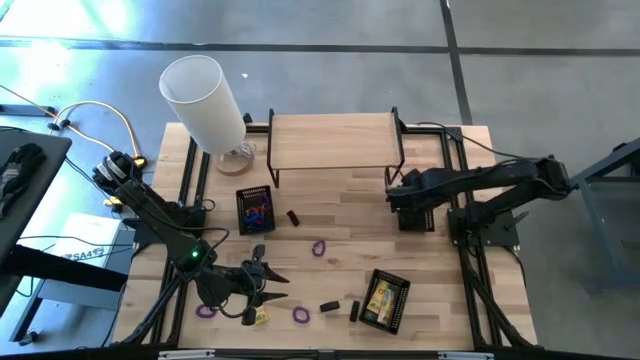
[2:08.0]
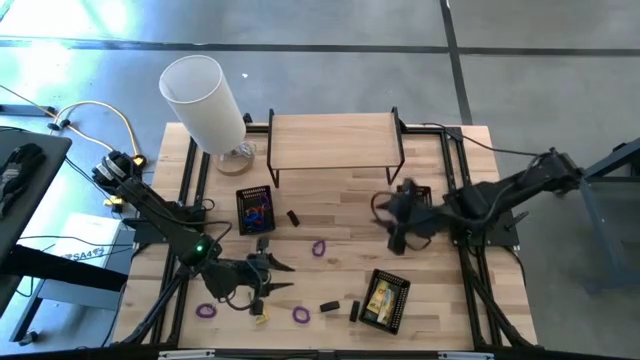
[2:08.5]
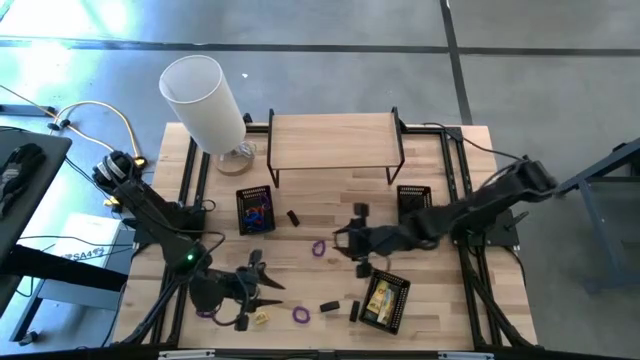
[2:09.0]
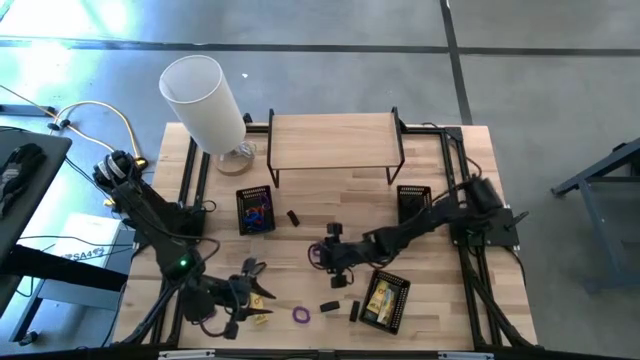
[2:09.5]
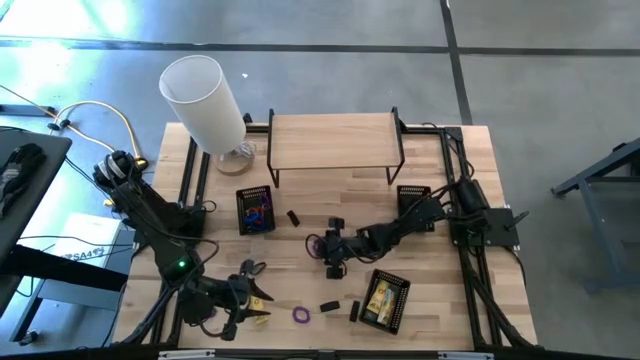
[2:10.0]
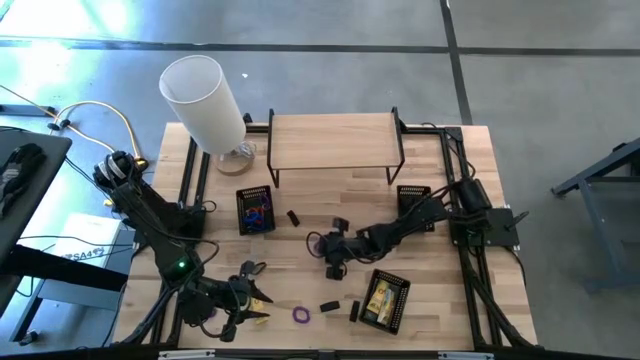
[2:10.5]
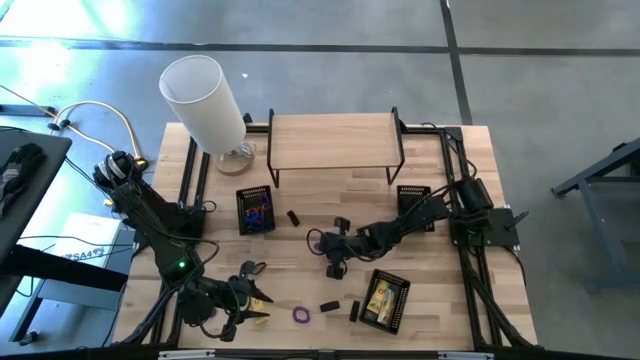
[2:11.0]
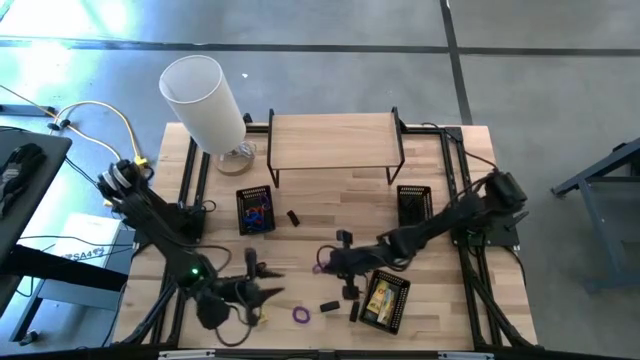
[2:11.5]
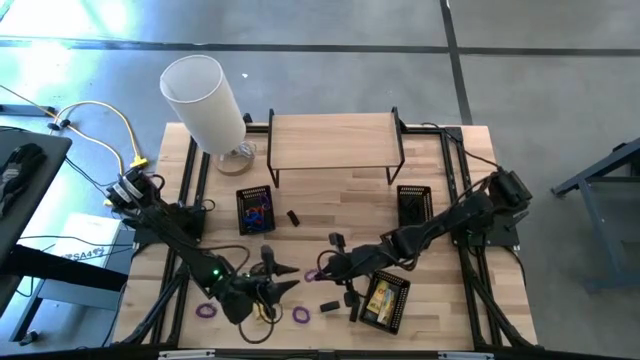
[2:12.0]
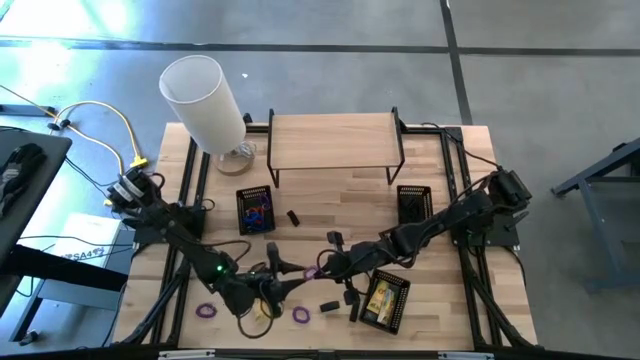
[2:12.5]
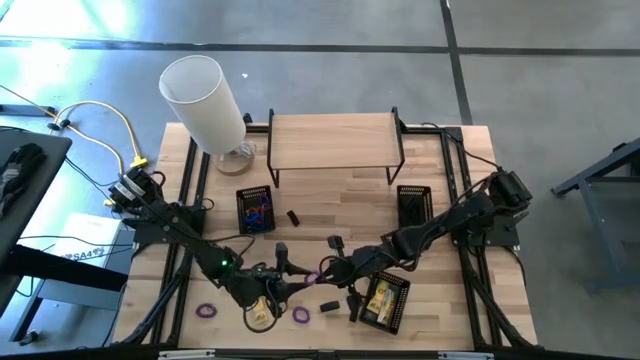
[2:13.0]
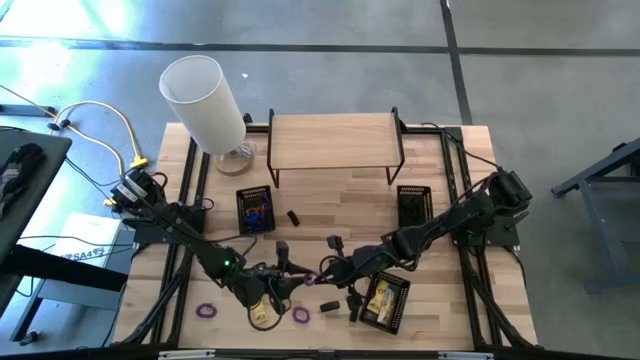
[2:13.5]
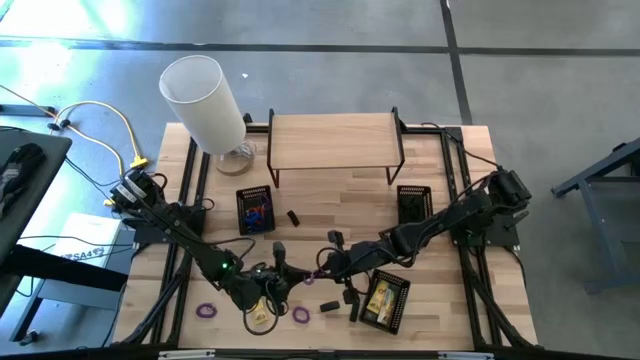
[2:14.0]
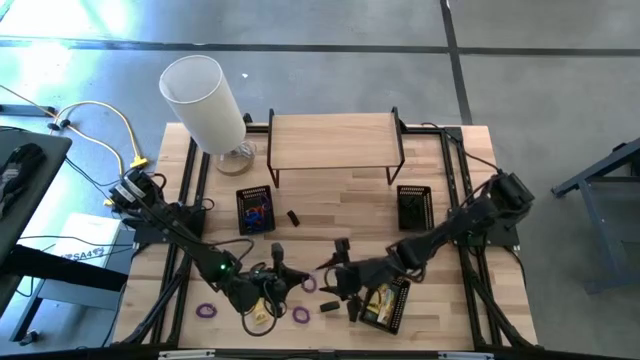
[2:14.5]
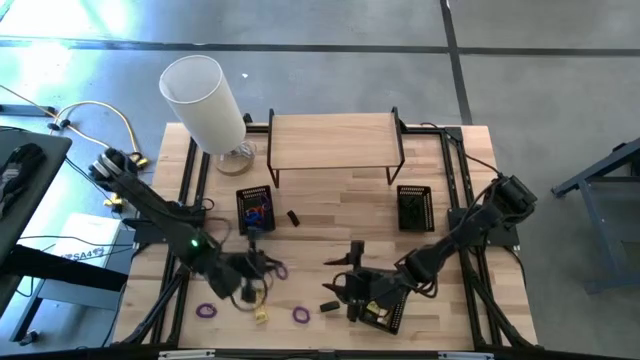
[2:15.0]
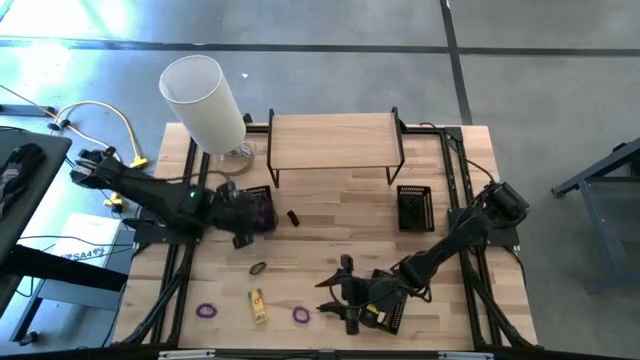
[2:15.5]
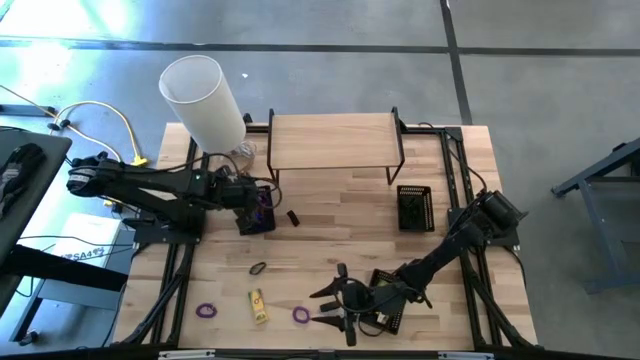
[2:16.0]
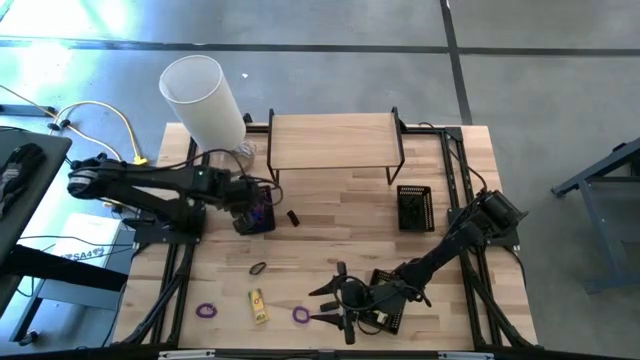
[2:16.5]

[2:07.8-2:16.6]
Task: Pick & Place Office Desk Supplies
Put the top purple spiral keychain into the top left bin

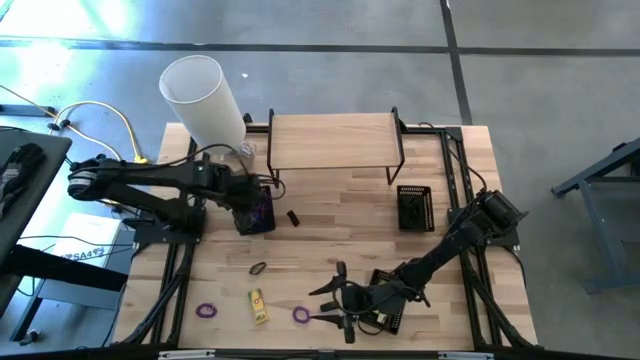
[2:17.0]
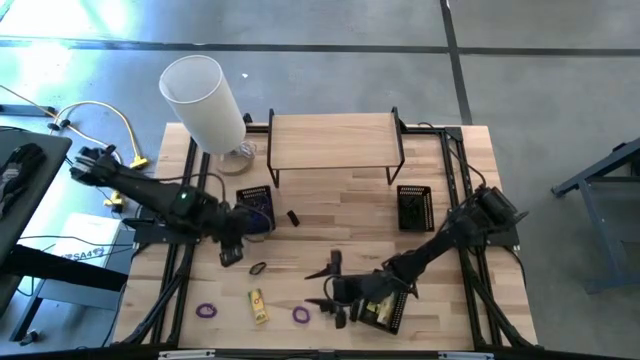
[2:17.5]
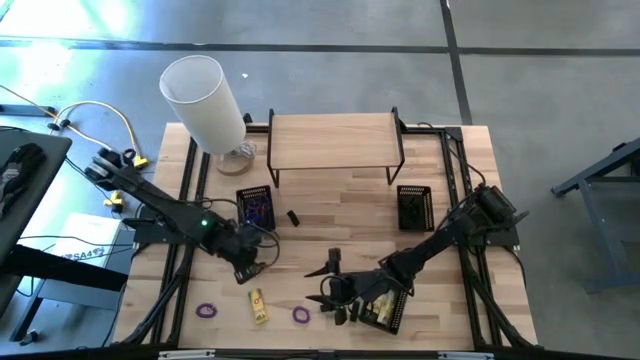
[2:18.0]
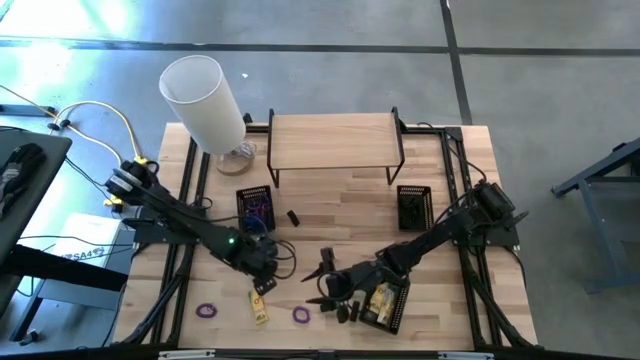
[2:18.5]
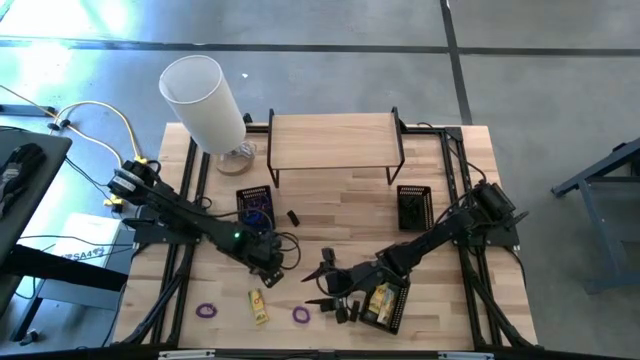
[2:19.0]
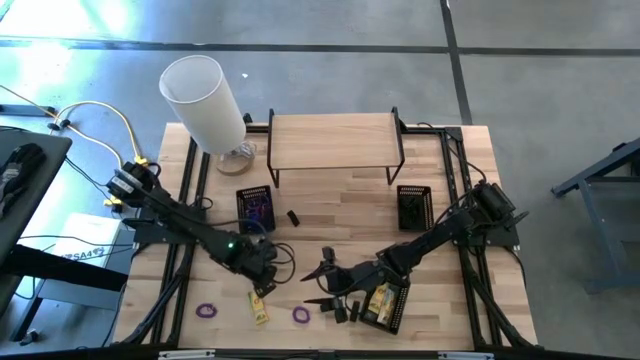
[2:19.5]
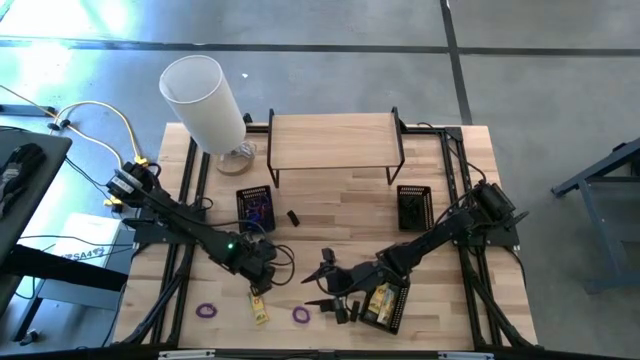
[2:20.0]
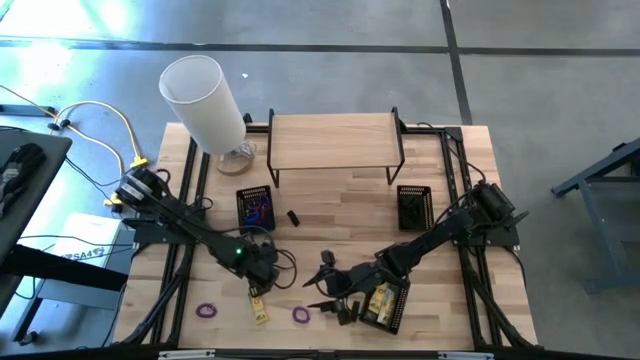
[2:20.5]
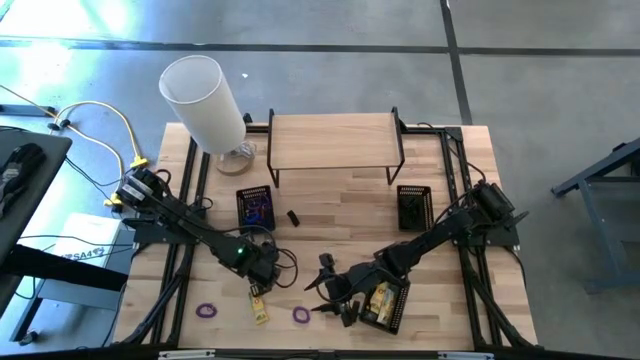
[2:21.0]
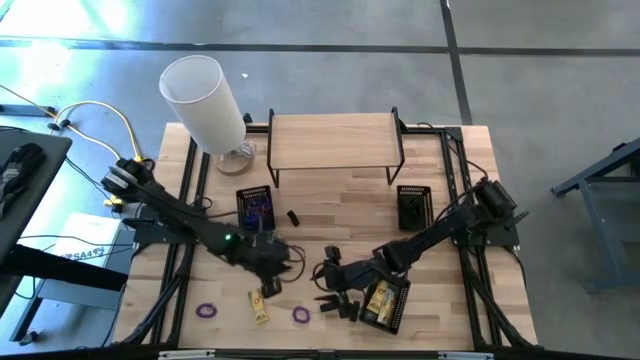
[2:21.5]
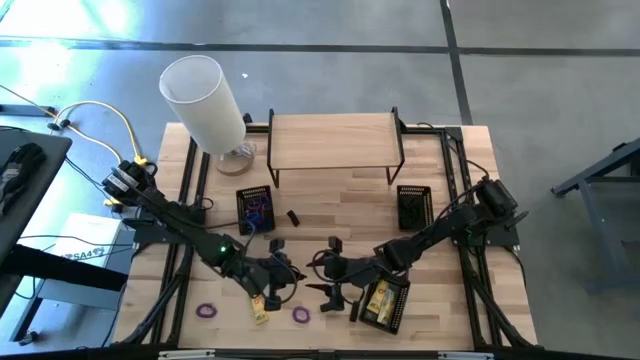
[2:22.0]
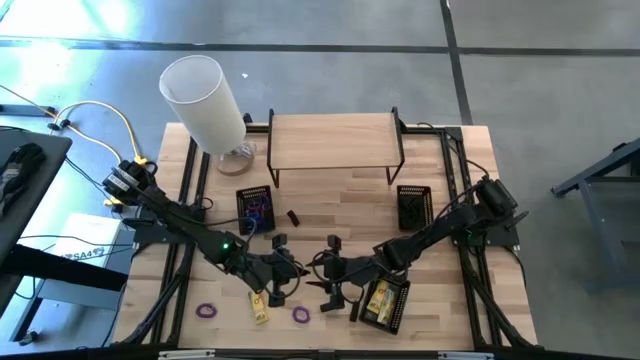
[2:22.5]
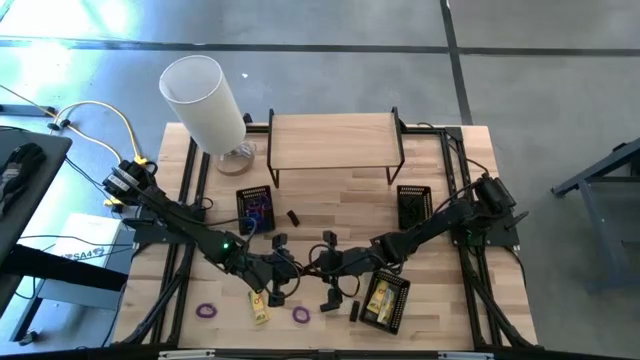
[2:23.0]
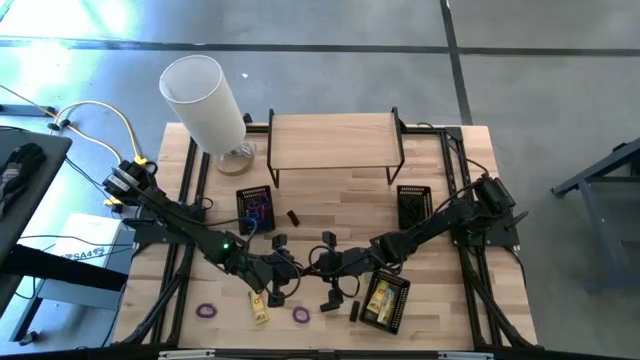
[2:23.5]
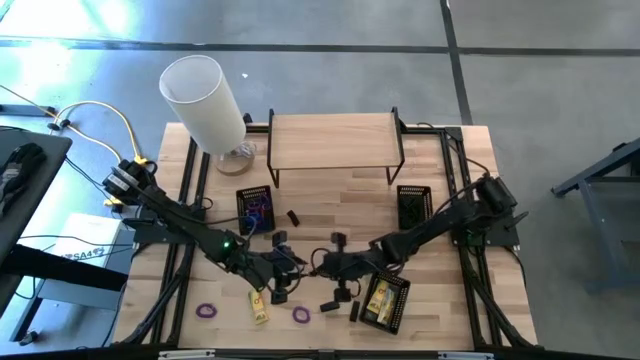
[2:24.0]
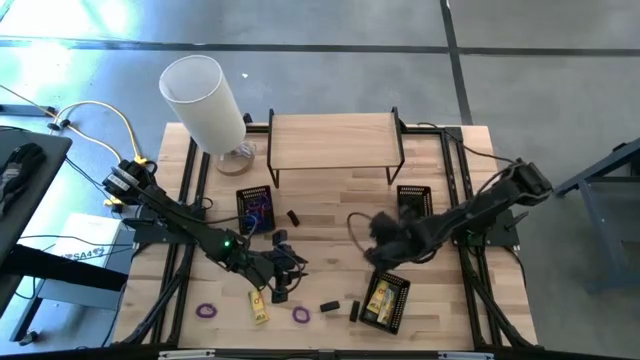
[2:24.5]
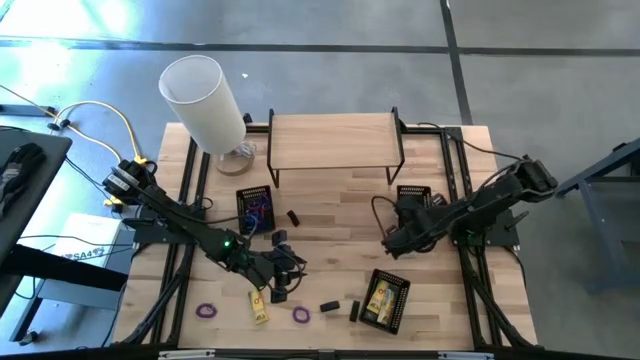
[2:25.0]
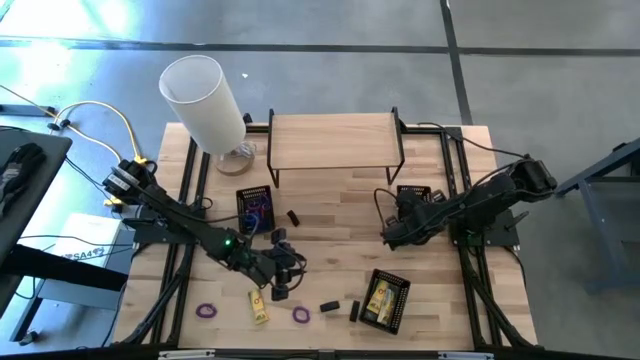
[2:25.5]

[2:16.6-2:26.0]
Put the rubber band into the top right bin

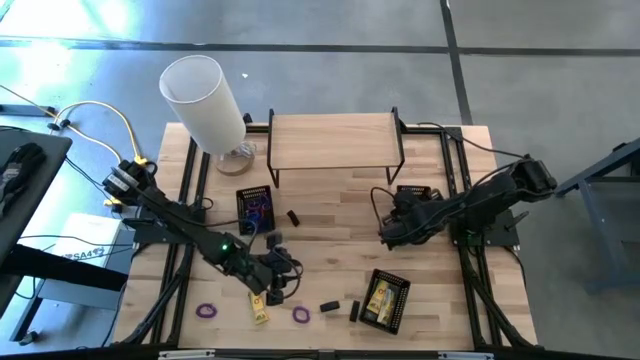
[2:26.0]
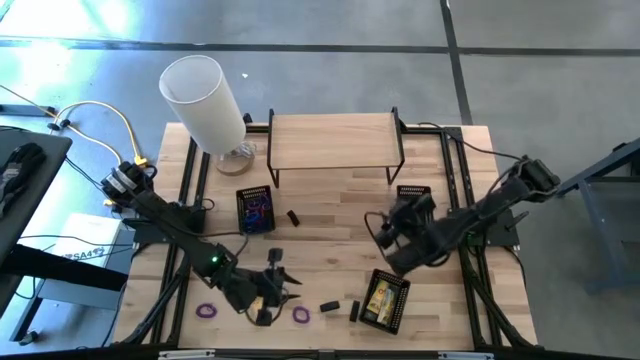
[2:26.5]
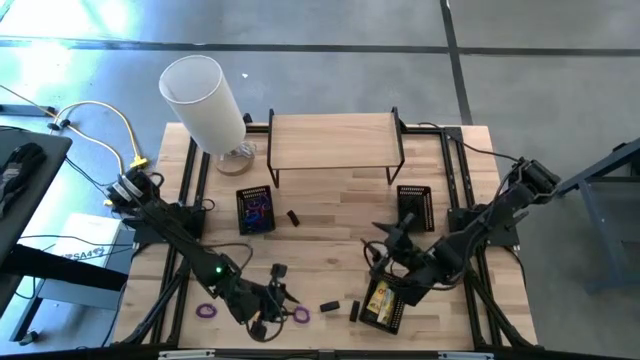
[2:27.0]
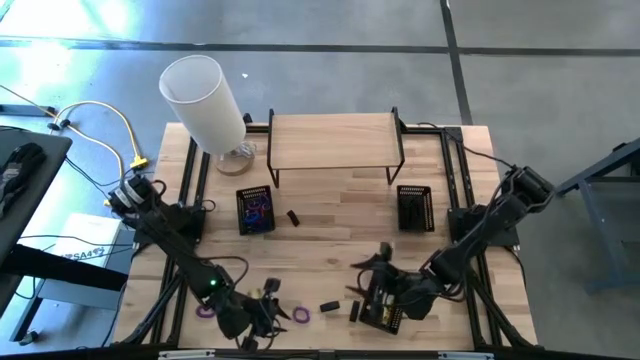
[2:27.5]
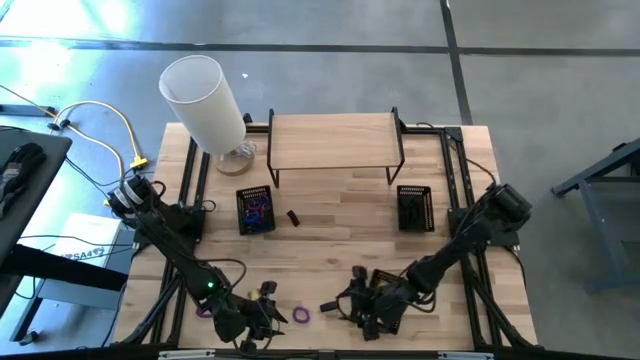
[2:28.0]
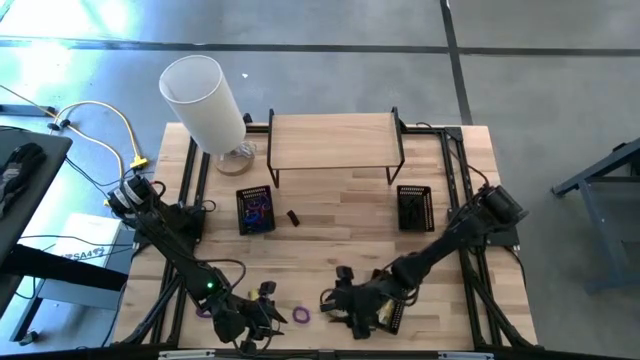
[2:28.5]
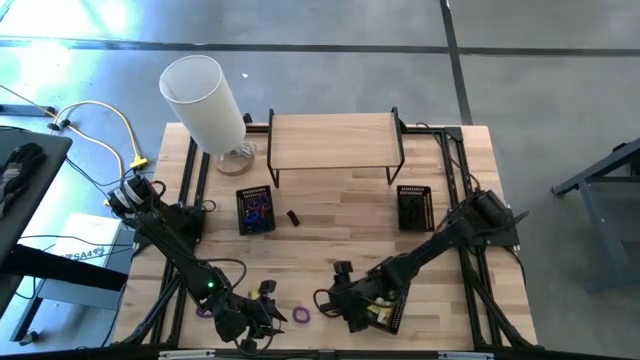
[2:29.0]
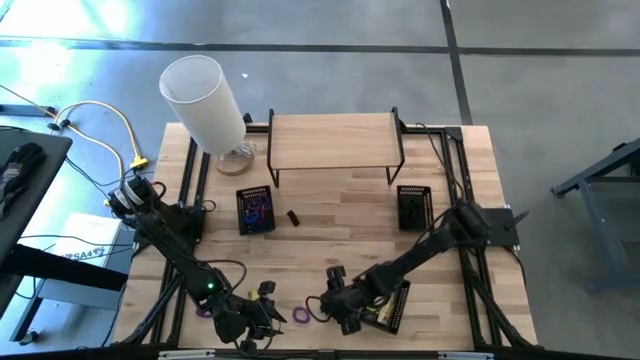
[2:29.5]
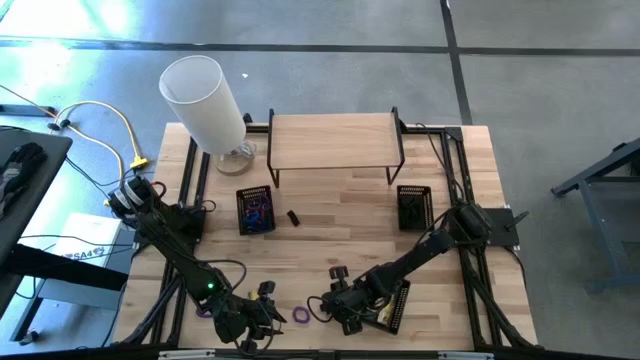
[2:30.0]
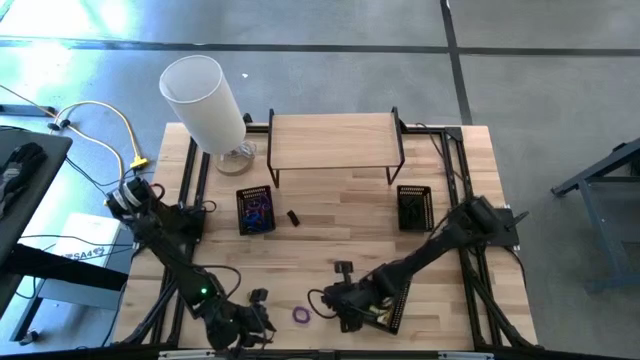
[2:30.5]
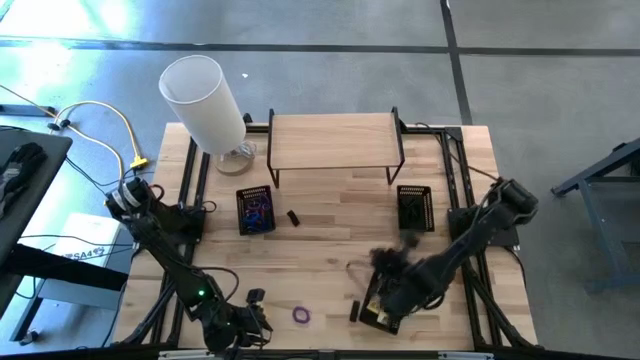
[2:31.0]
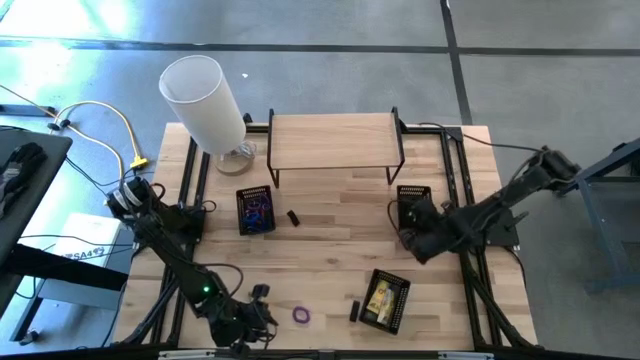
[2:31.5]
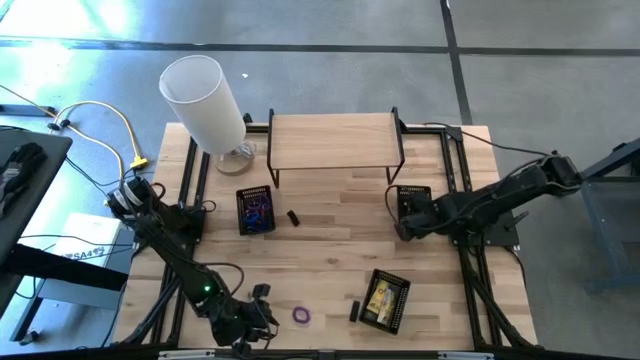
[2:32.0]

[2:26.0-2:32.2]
Put the bottom left rubber band into the top right bin
